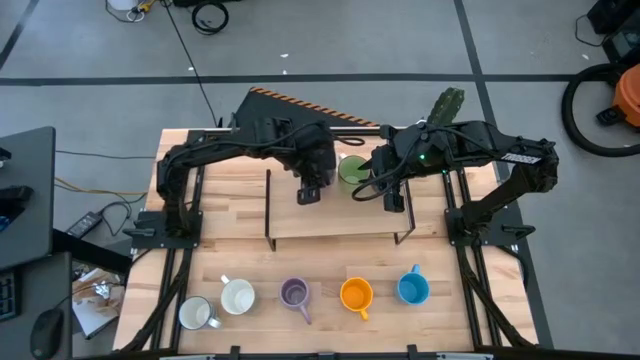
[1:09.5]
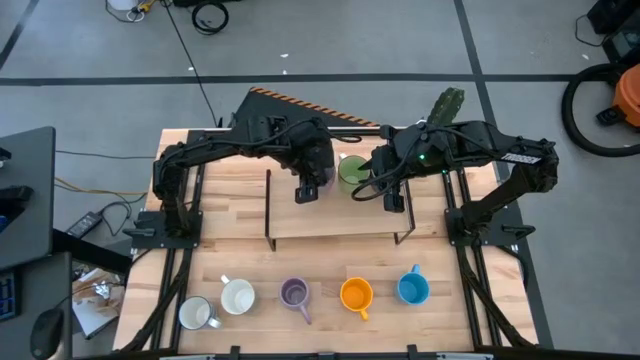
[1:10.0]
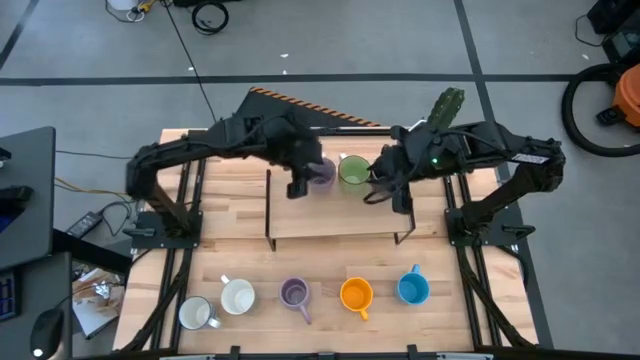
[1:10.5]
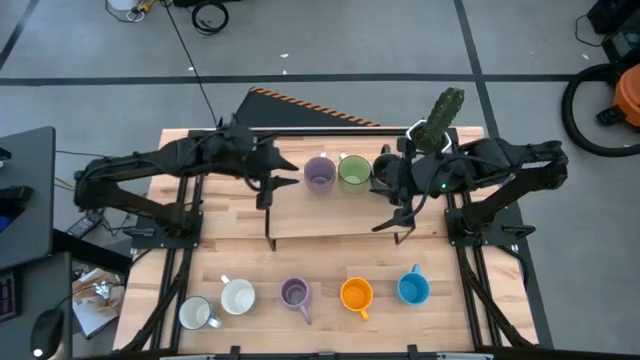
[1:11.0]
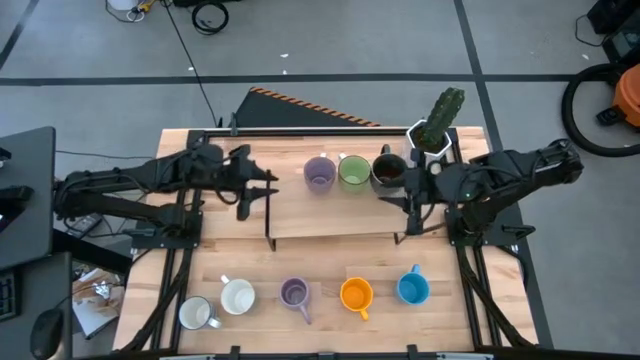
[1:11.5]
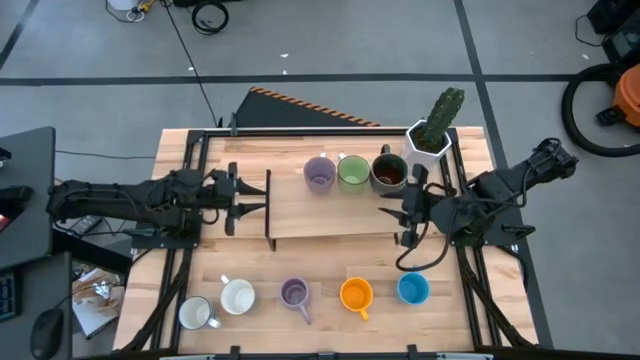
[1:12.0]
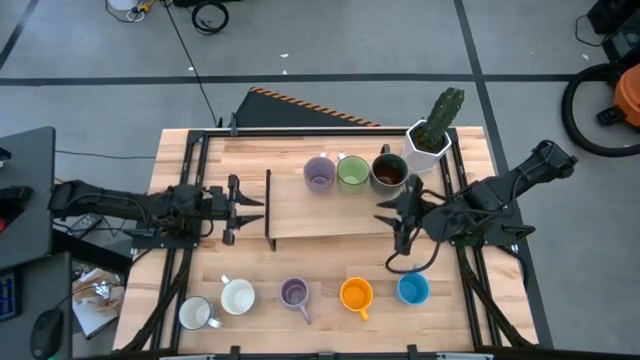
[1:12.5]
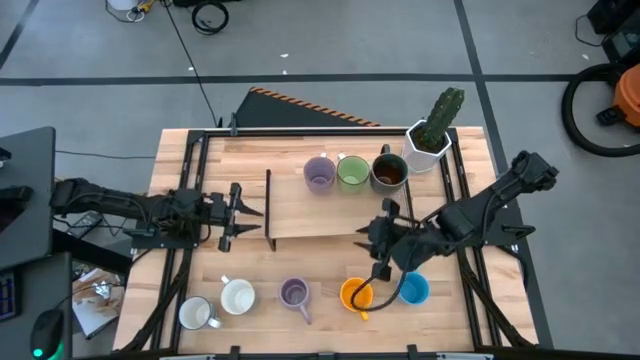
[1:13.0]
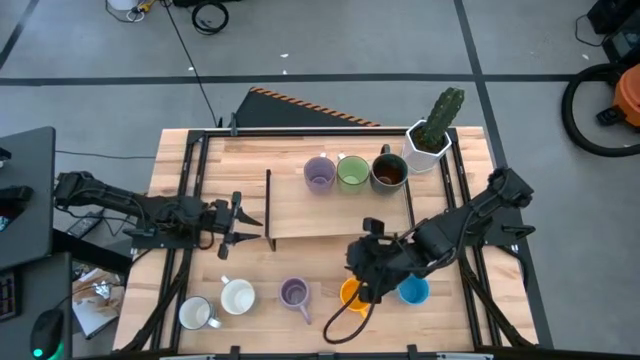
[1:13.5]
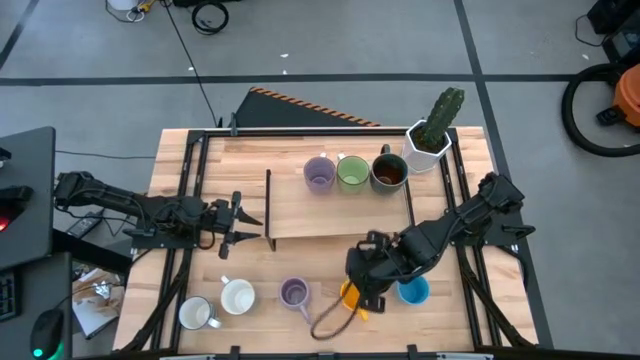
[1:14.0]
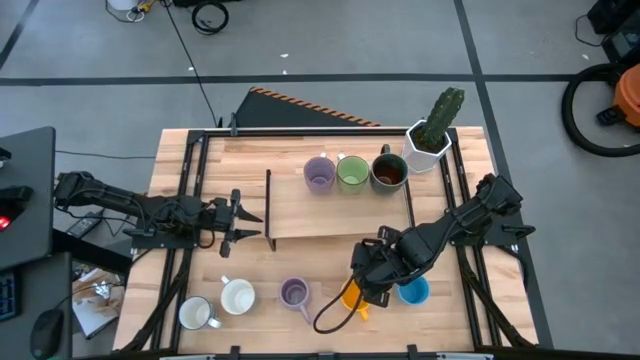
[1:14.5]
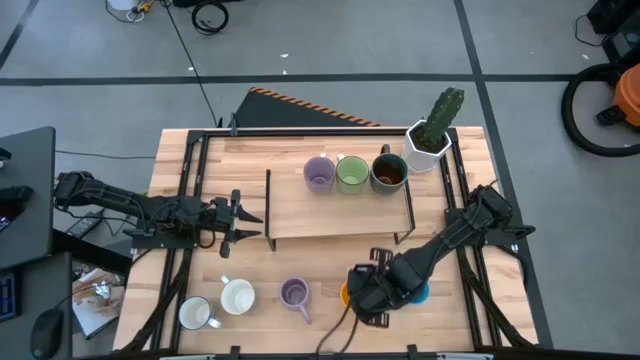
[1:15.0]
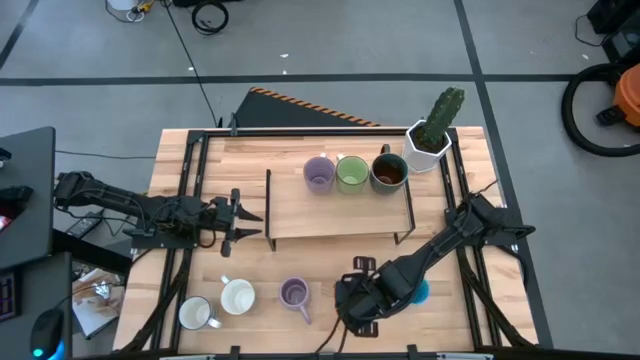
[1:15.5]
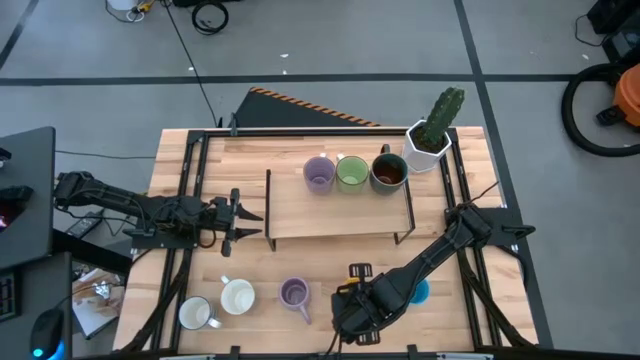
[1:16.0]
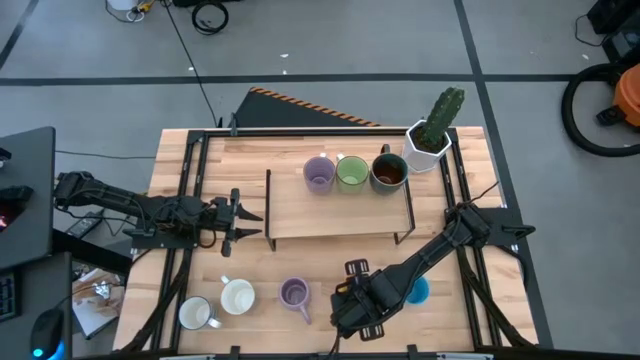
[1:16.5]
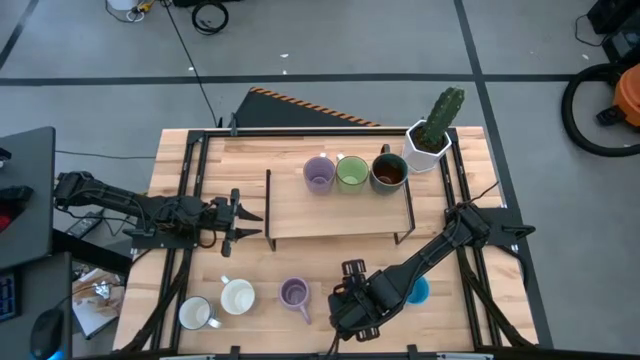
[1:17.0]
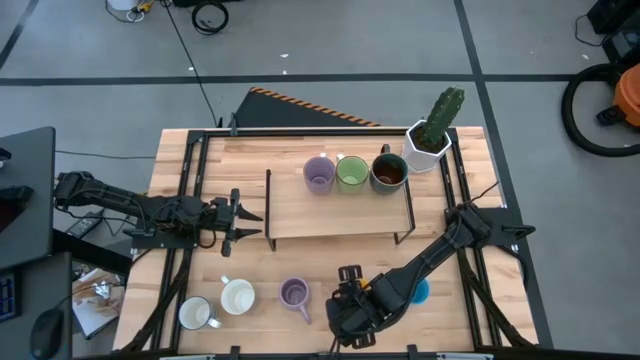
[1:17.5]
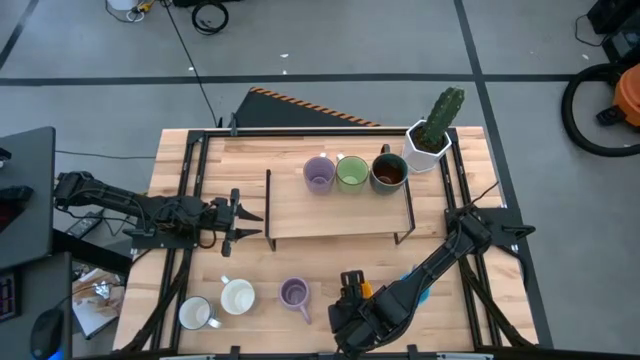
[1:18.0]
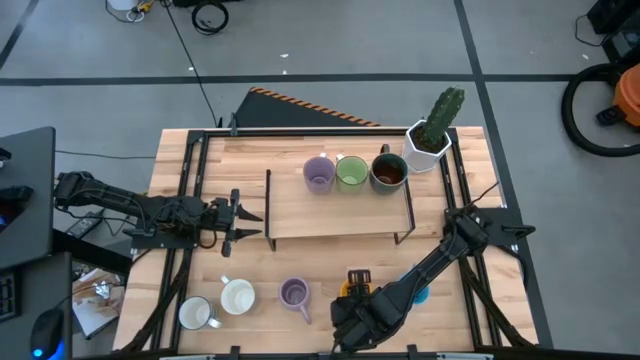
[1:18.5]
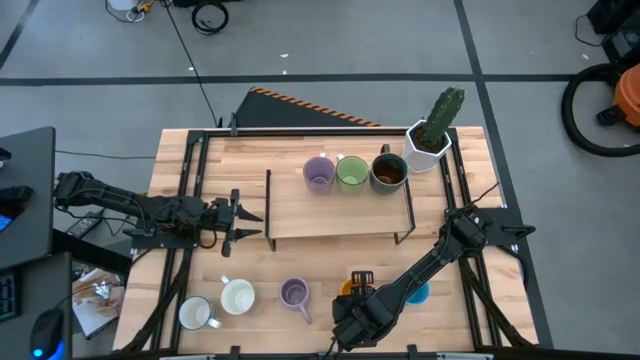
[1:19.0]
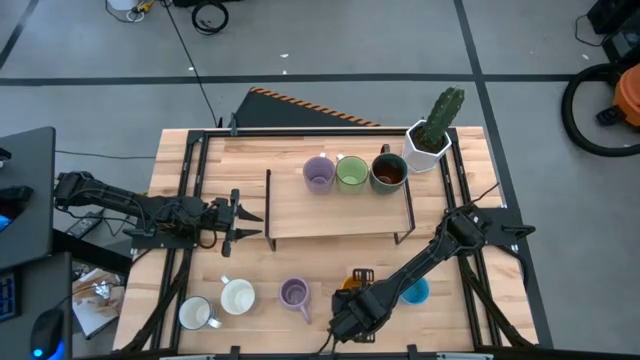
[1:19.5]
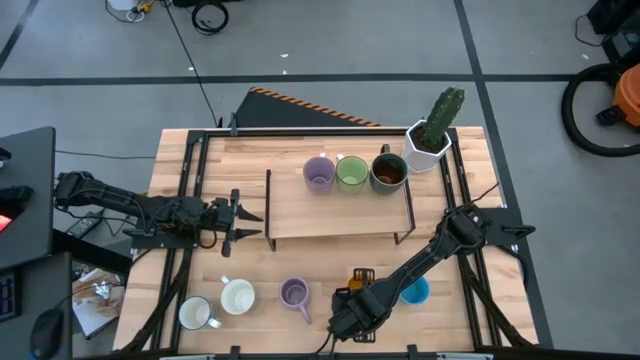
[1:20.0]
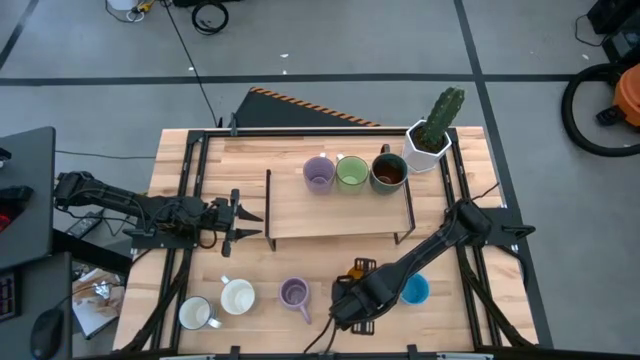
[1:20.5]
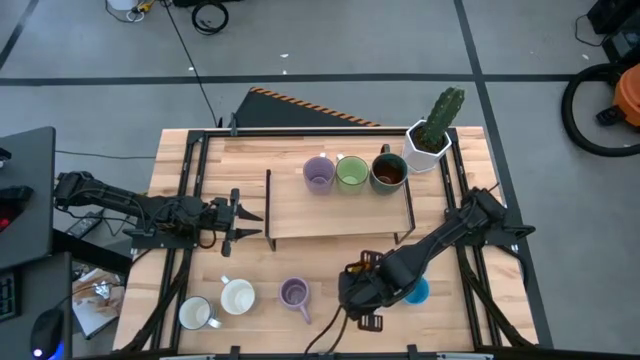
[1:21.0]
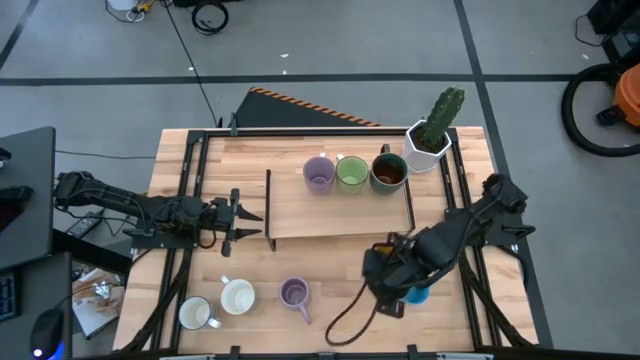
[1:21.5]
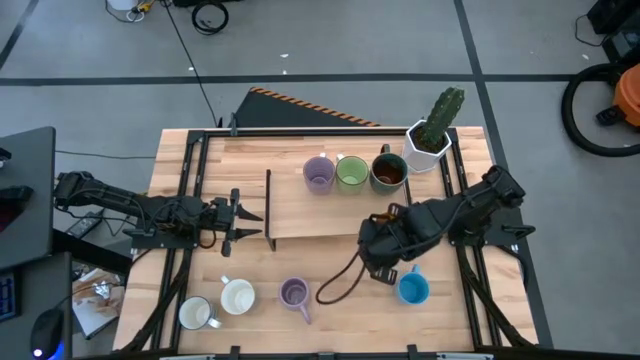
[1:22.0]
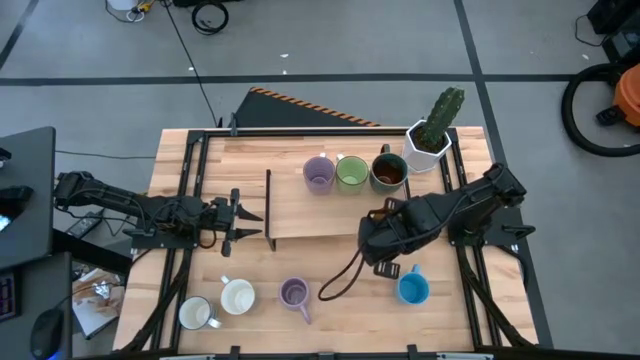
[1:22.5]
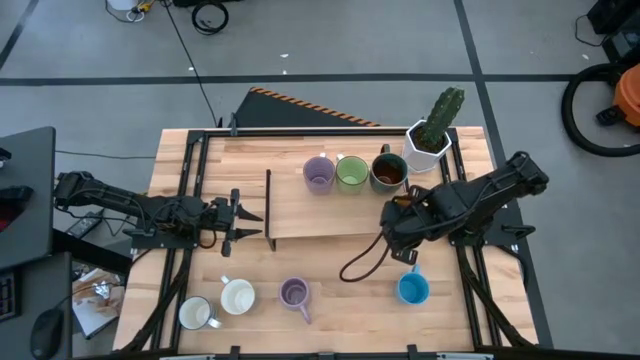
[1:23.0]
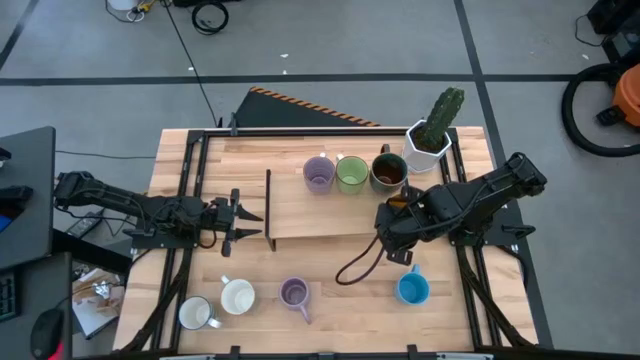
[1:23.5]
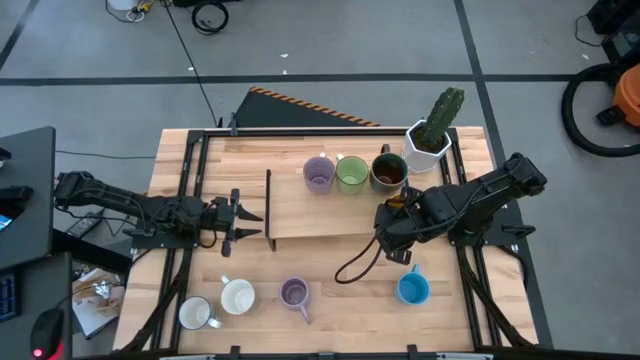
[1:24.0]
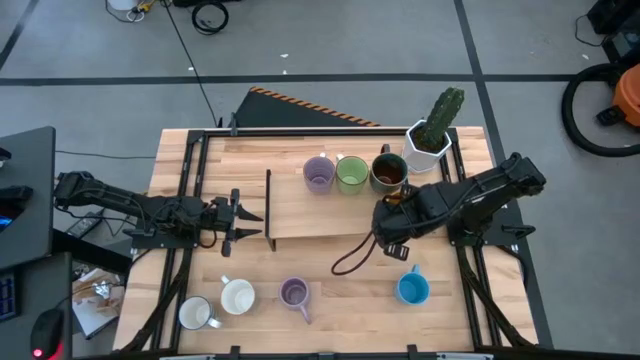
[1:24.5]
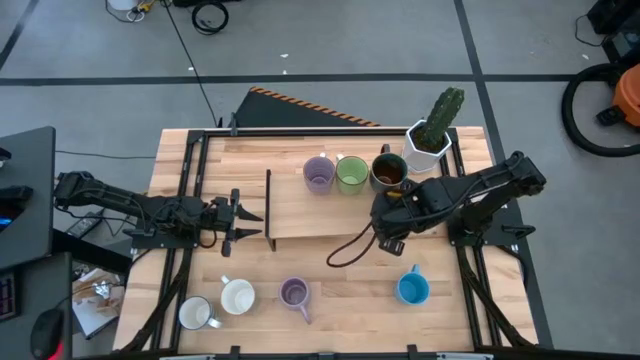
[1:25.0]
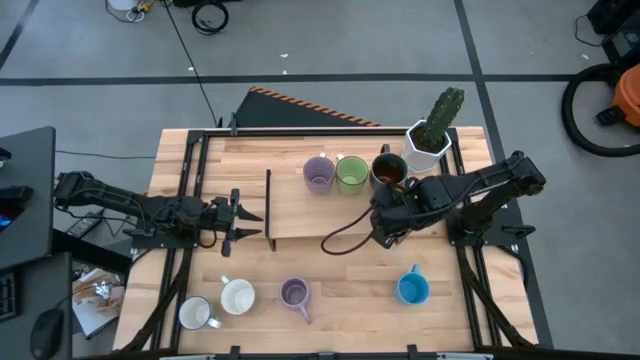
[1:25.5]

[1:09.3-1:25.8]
Task: Place coffee mugs
Put the yellow mug on the shelf
